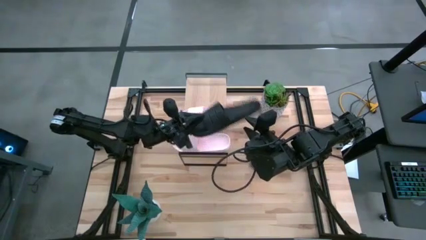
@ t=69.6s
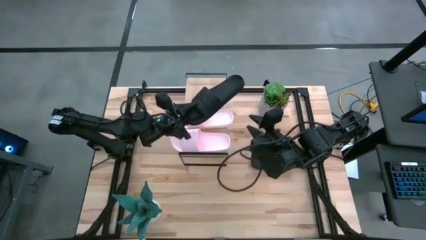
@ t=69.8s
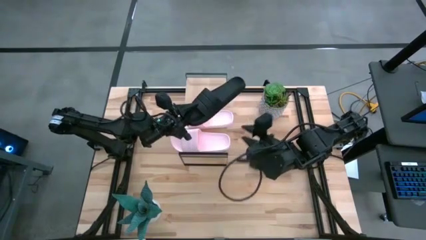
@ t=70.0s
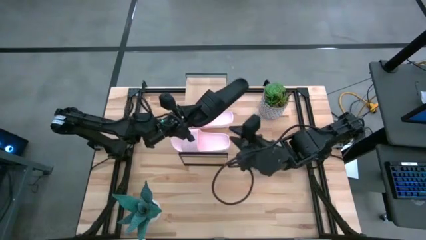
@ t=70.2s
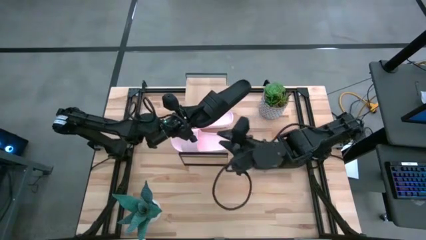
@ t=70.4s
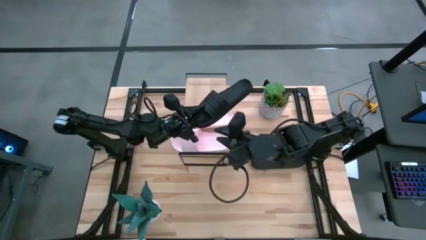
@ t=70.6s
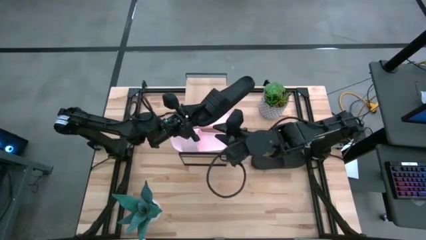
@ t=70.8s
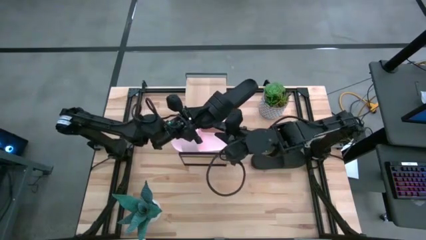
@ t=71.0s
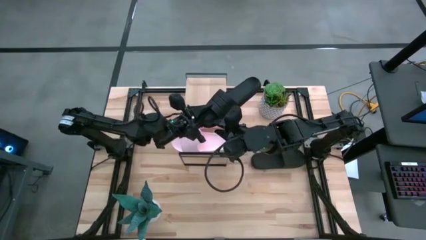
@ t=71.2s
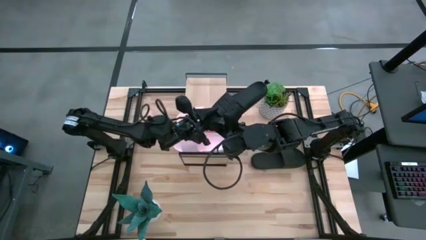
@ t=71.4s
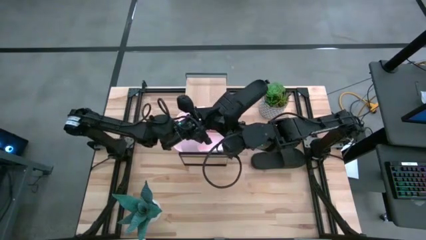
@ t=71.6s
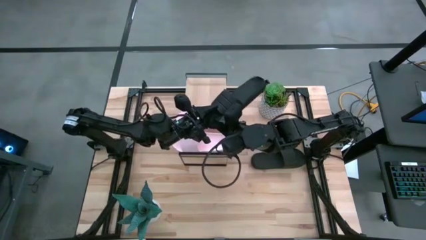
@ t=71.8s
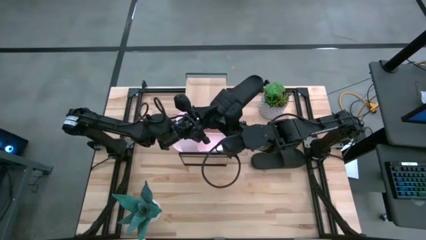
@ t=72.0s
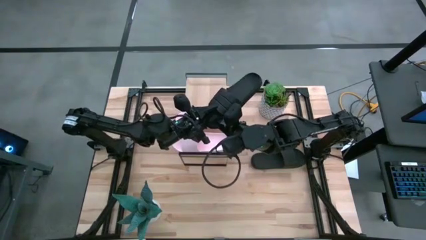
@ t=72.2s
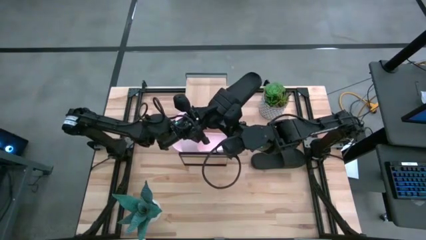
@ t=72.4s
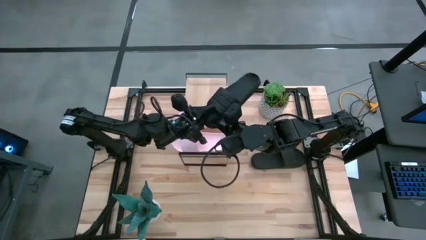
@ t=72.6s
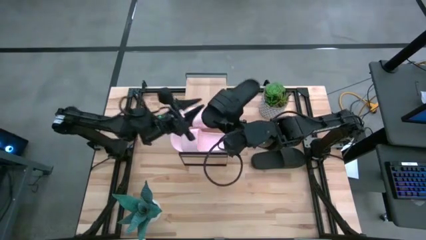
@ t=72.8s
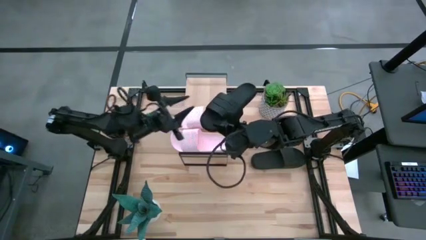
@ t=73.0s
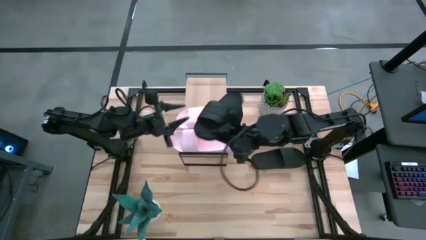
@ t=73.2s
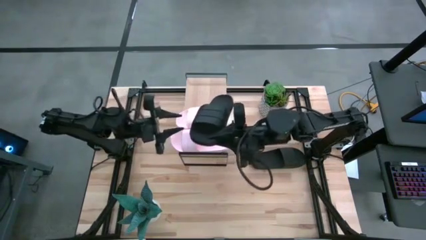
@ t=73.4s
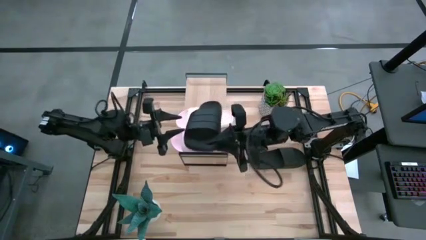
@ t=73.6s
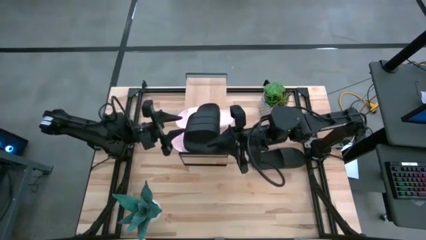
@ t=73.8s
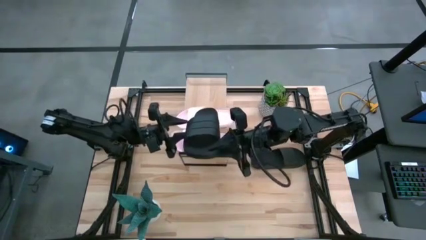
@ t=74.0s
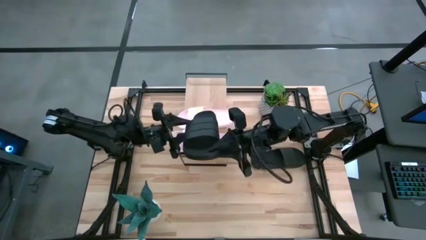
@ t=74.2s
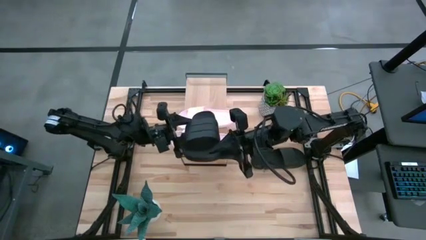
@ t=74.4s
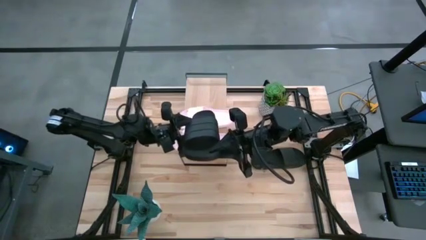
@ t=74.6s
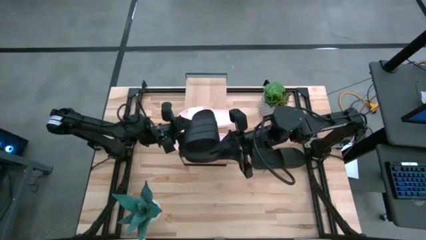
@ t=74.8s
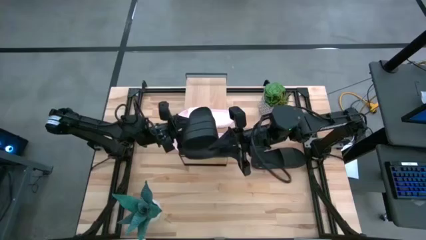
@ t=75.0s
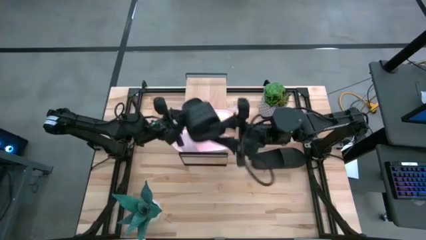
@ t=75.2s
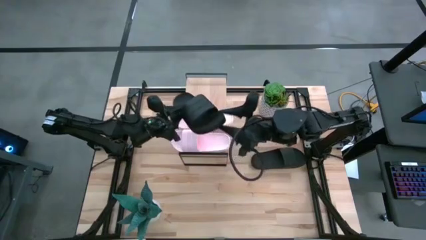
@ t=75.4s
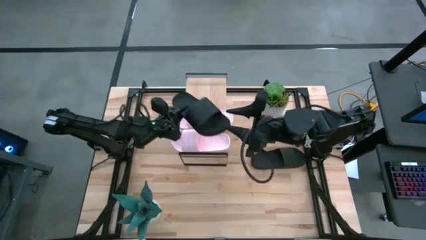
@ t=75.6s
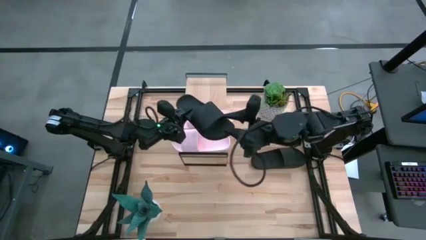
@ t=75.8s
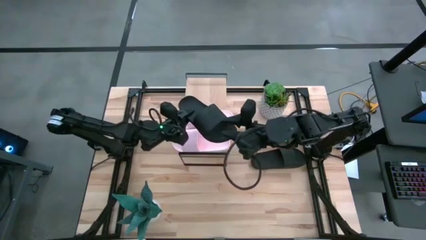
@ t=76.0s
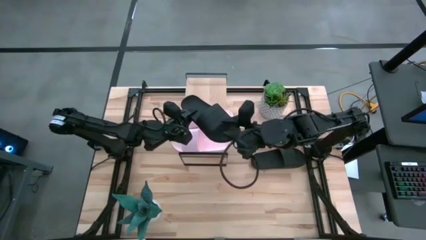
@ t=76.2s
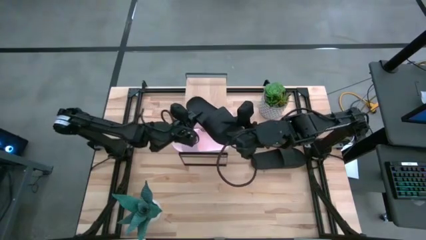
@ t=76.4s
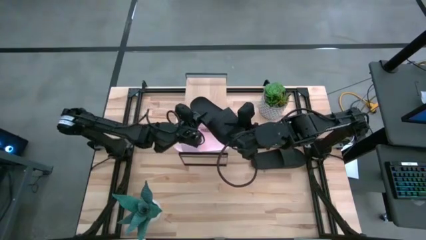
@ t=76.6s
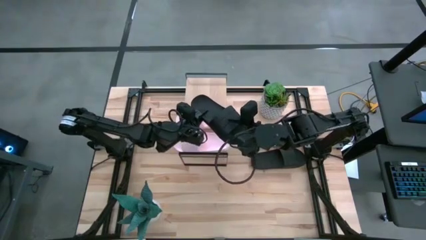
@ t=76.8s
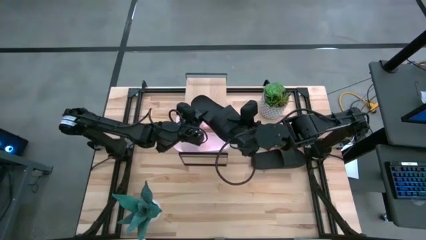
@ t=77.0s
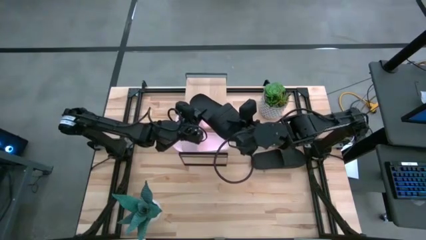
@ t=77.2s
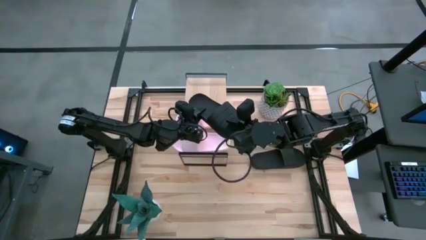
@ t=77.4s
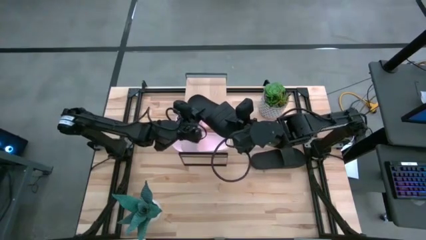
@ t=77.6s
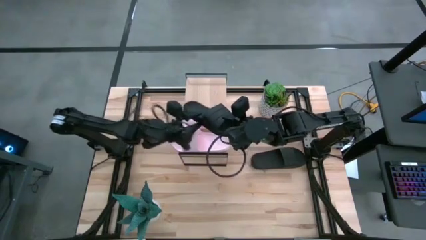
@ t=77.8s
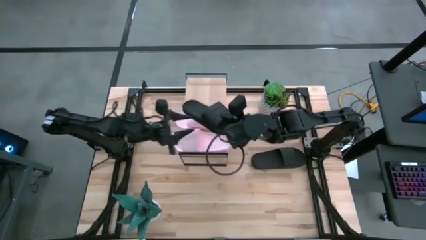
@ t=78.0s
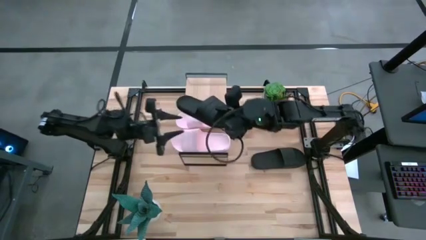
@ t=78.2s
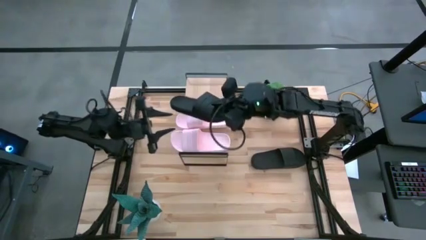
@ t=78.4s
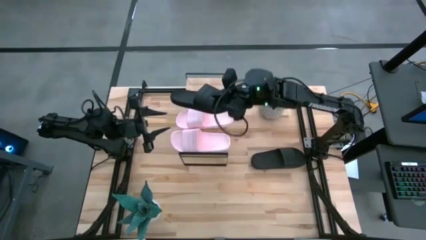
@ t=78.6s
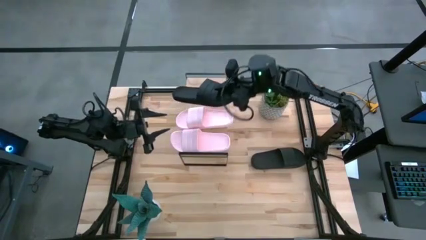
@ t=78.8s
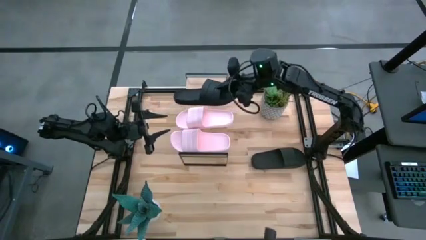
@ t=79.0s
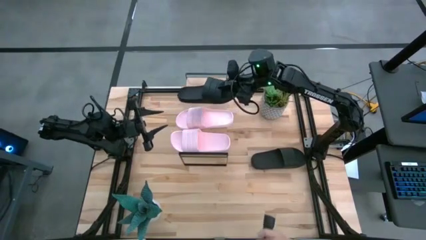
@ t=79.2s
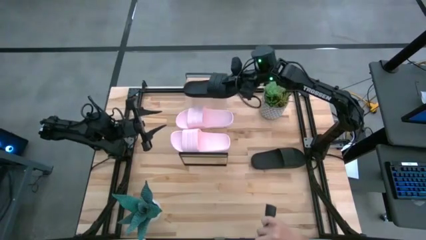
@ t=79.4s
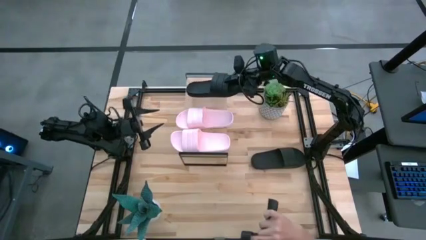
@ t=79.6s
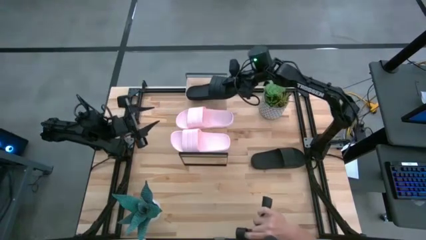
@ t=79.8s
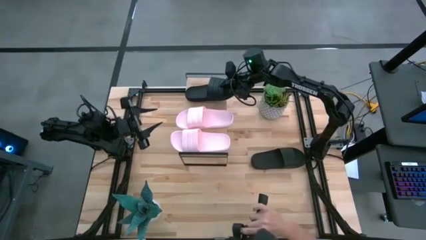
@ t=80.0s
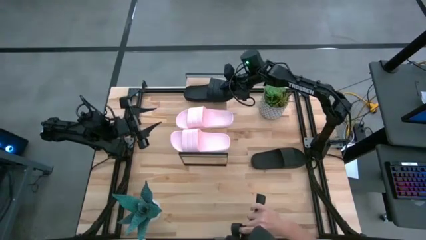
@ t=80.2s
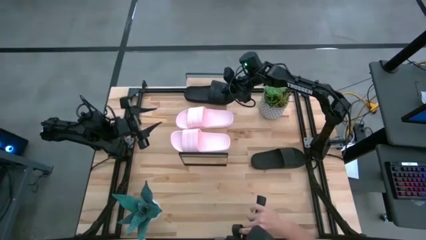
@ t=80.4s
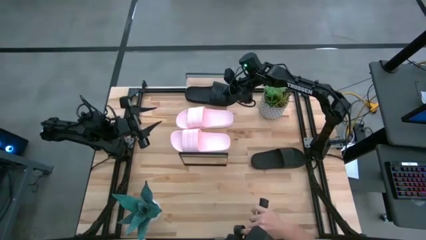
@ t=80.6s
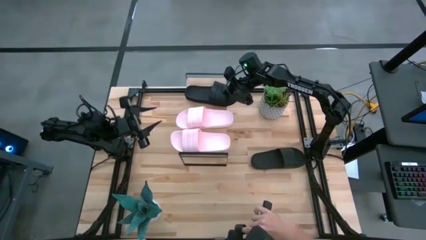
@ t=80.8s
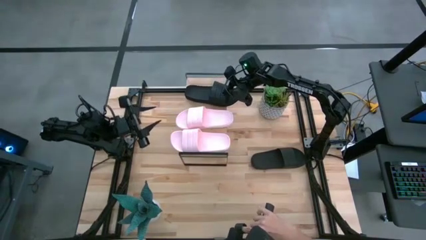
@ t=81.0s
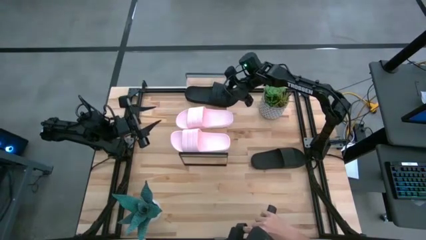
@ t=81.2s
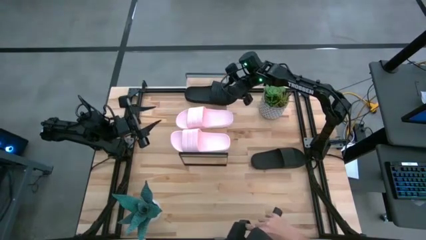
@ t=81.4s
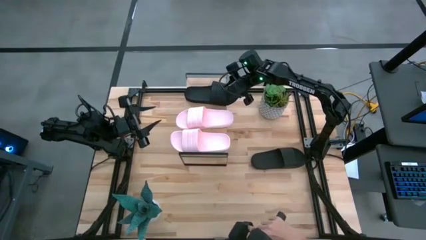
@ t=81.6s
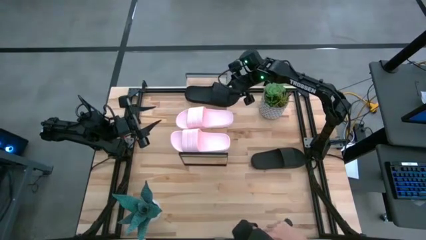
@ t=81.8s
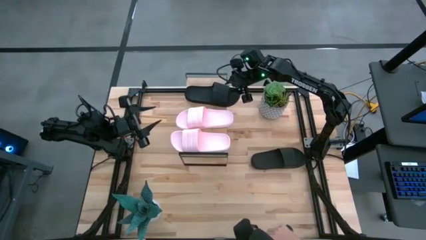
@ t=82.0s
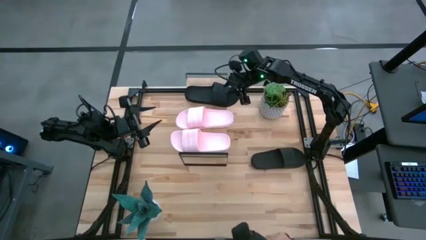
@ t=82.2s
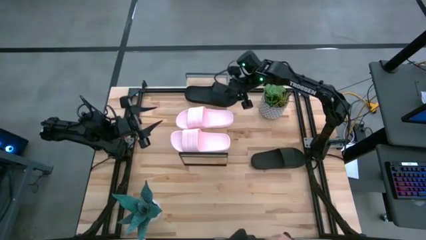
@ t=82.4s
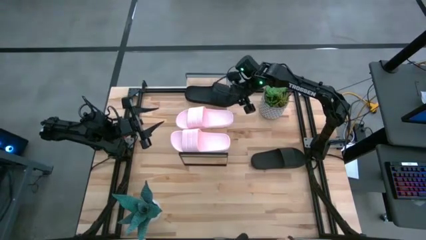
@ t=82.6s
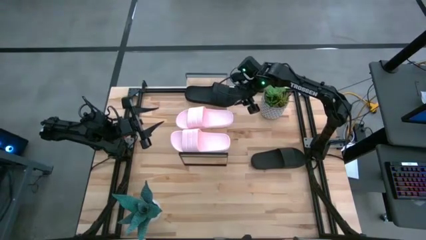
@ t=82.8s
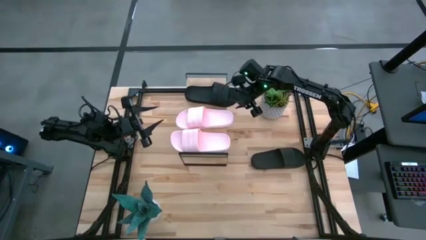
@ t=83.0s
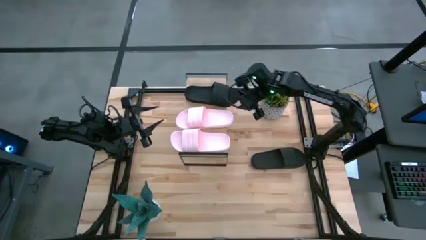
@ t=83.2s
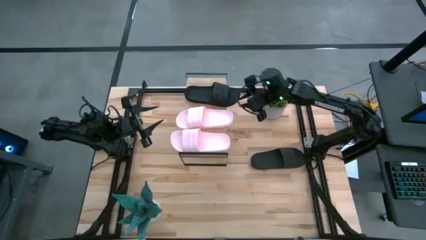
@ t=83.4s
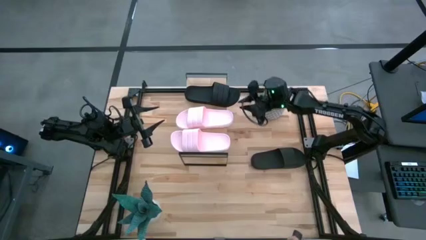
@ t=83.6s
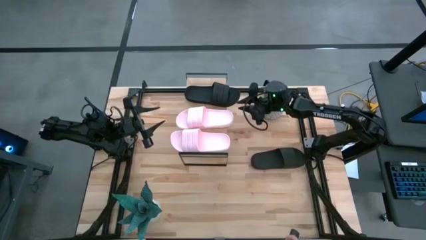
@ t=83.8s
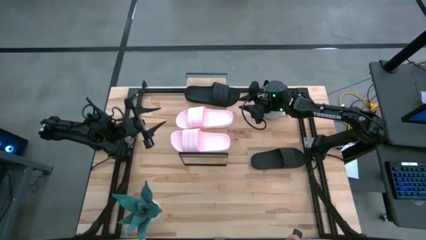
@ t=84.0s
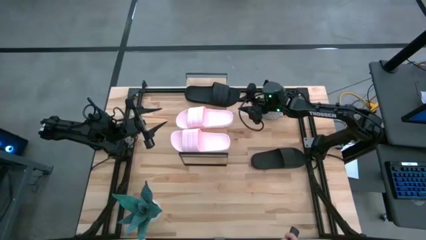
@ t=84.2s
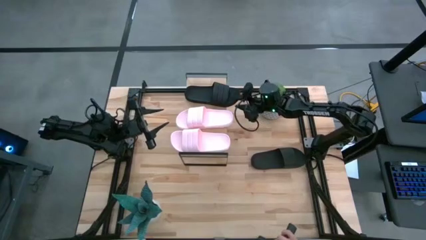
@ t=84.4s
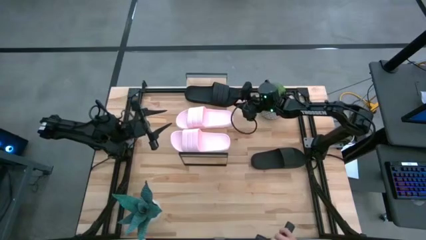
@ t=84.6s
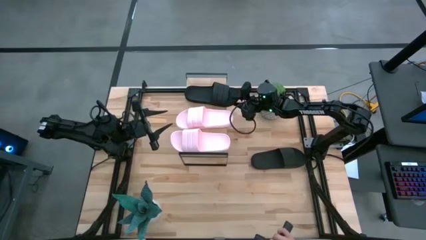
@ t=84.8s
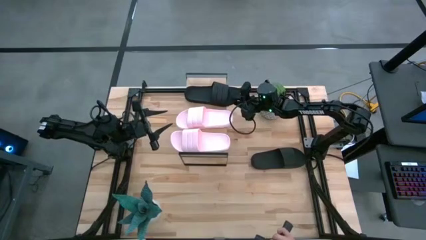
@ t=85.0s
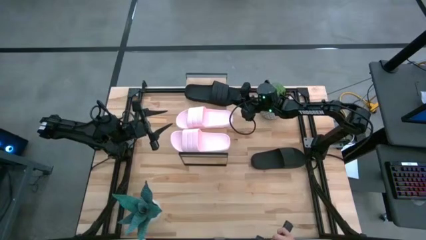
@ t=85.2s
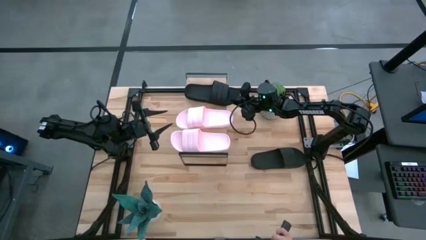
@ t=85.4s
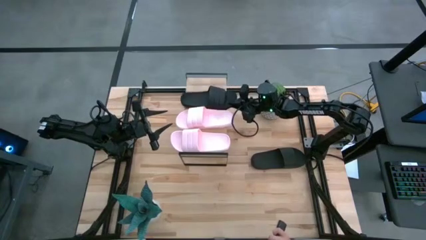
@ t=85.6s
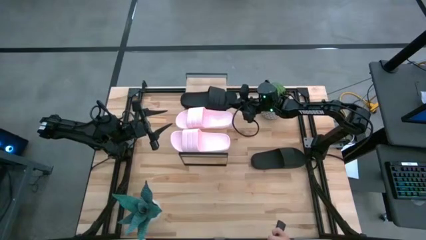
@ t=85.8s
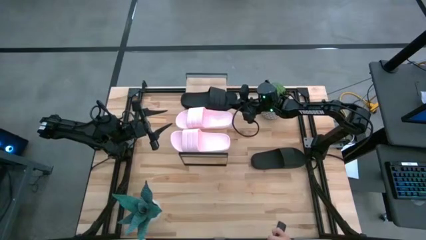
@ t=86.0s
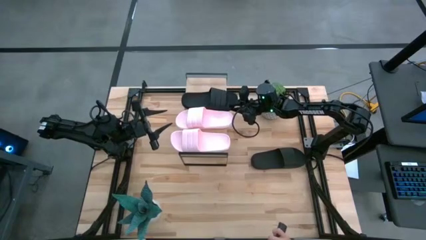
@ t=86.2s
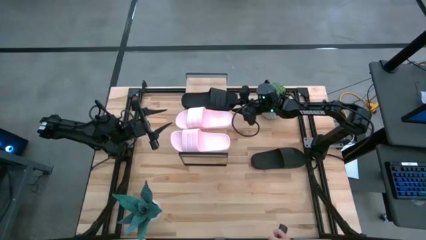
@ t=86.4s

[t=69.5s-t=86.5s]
Task: Pick and place slides into the shelf
Put the bottom black slipper on the shelf
